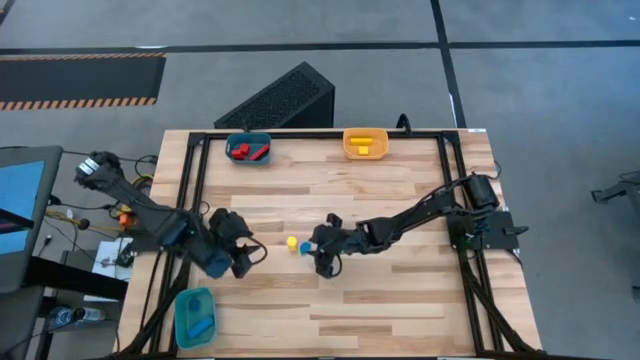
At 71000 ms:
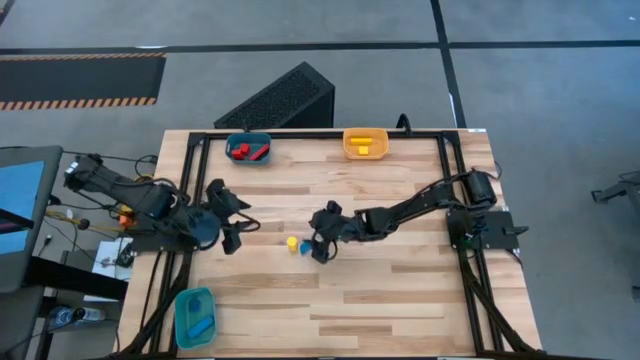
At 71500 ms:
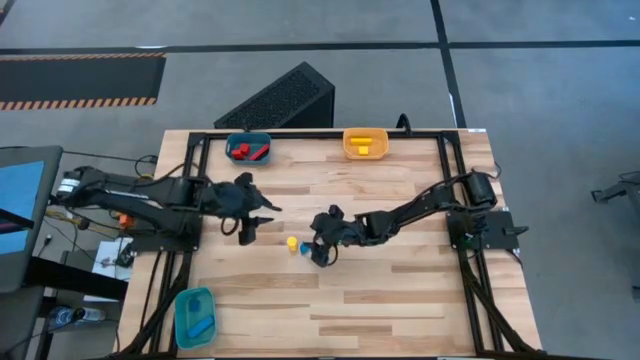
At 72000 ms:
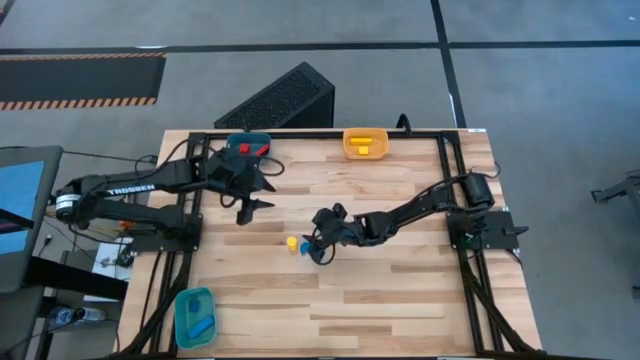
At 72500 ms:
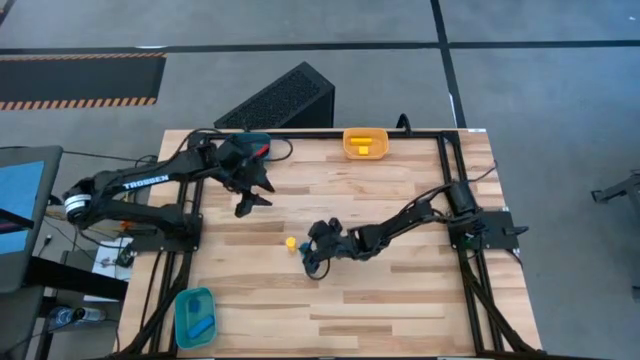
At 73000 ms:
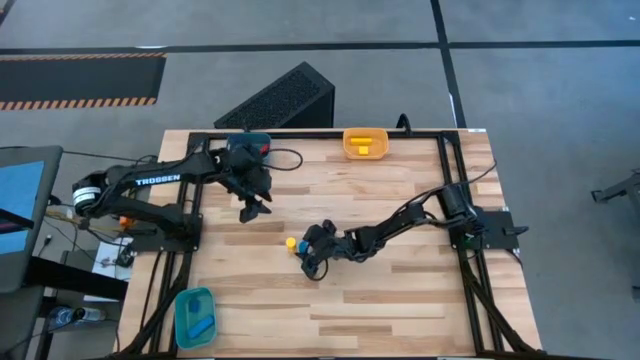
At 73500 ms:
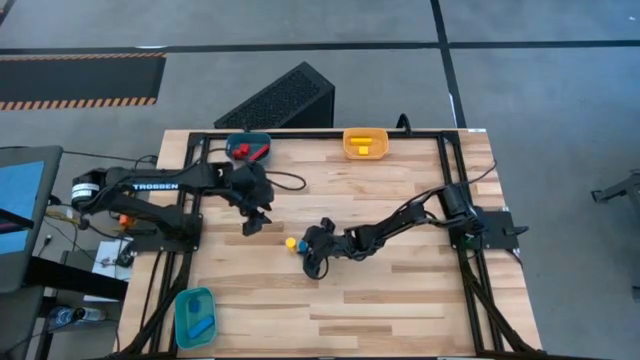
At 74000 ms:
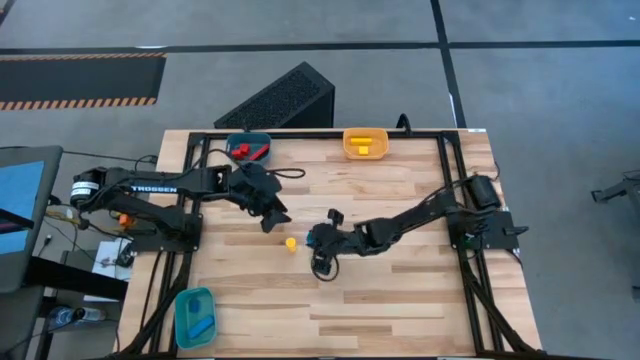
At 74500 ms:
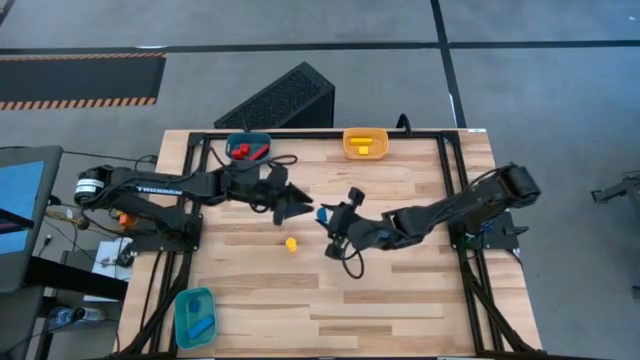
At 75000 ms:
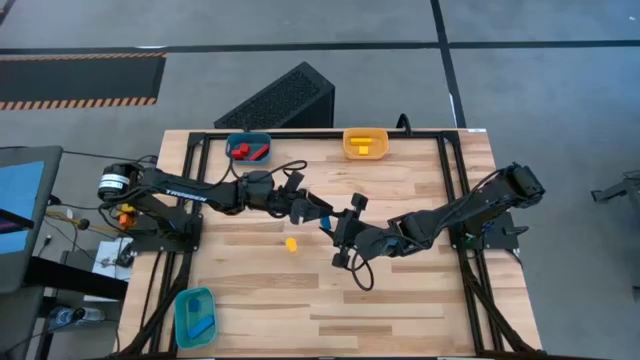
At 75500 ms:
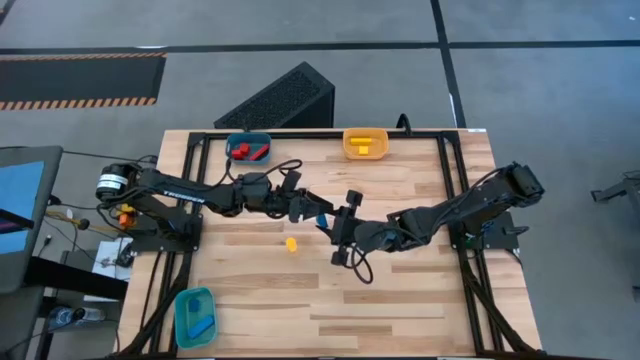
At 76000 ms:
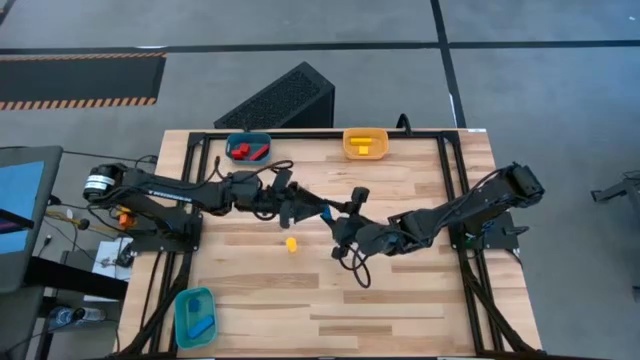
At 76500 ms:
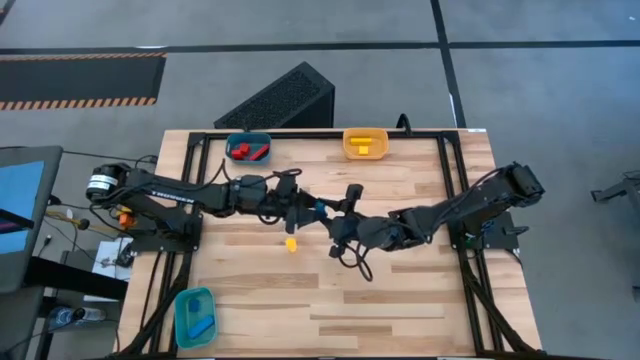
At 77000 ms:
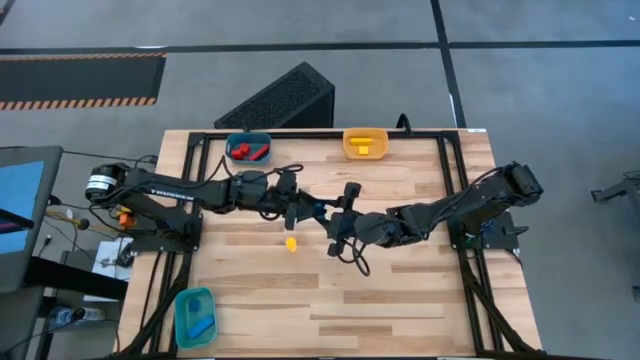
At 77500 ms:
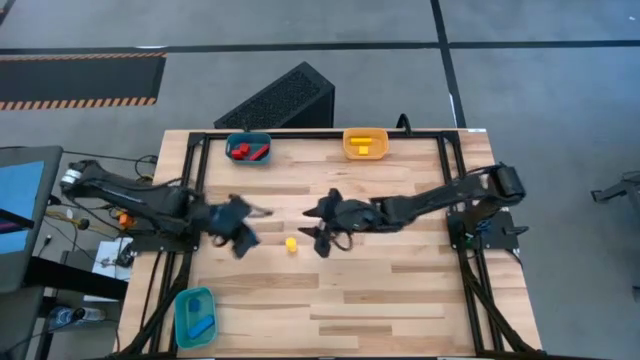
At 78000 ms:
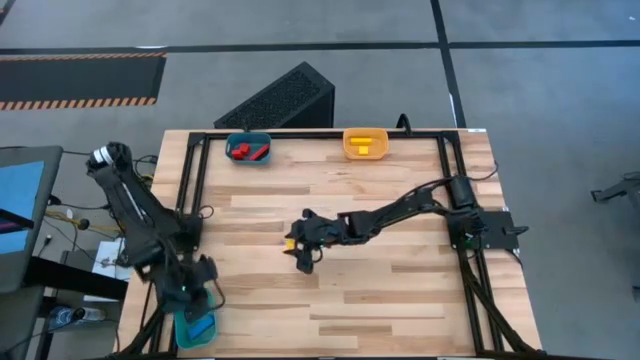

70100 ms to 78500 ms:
Task: Sort & place blocks by color
Put the blue block into the green bin

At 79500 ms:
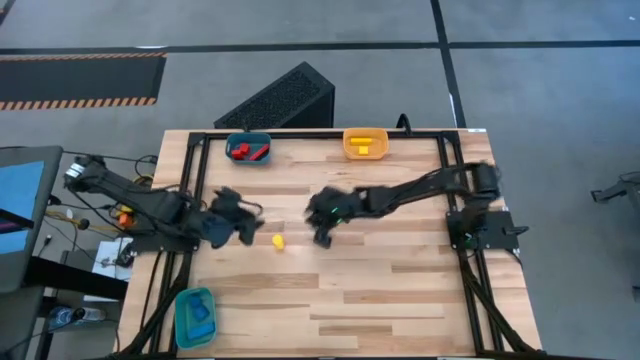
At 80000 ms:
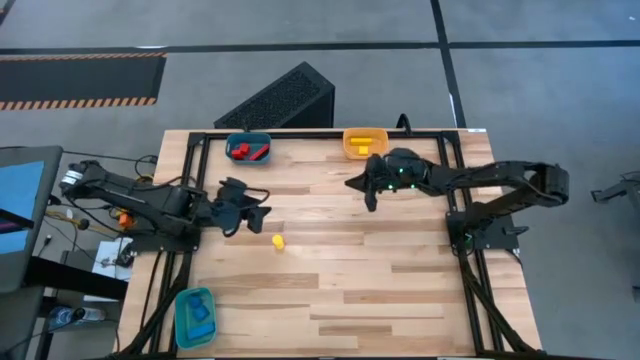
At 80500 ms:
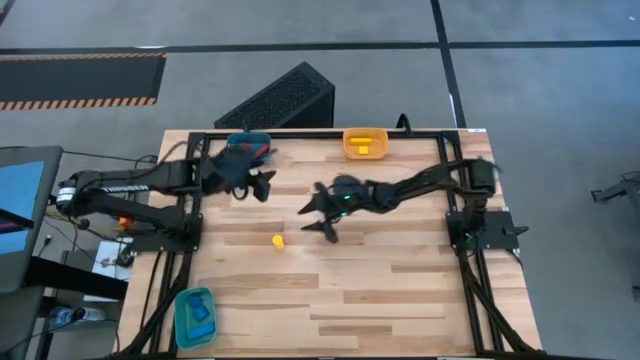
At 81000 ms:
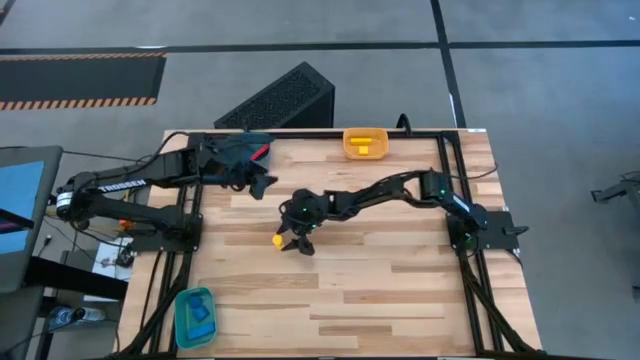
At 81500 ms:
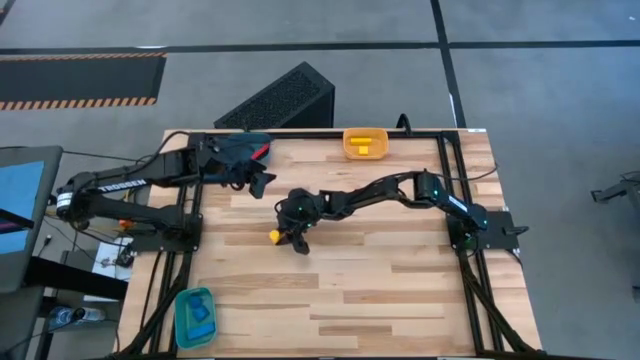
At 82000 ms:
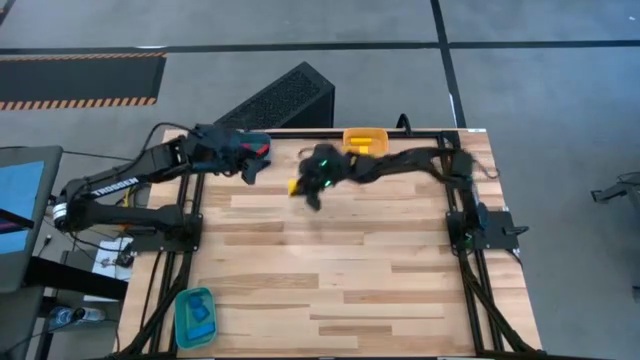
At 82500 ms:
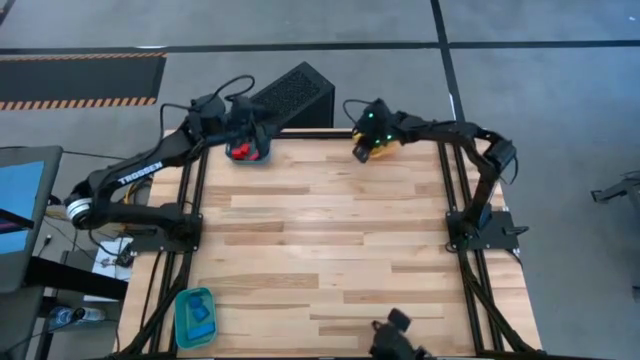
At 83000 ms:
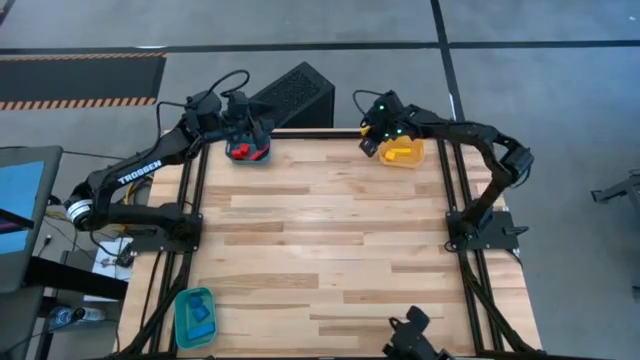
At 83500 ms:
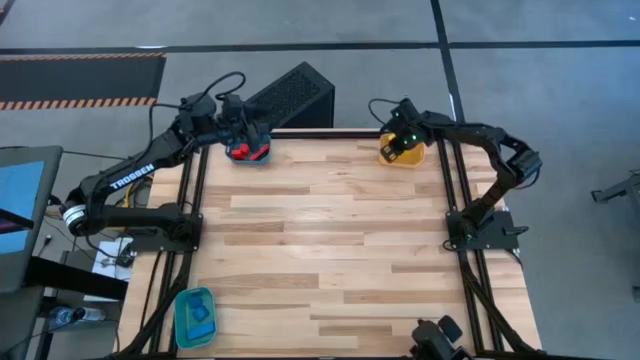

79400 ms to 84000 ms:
Put the yellow block into the yellow bin

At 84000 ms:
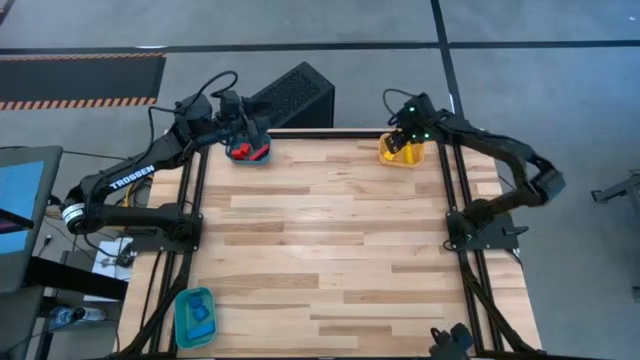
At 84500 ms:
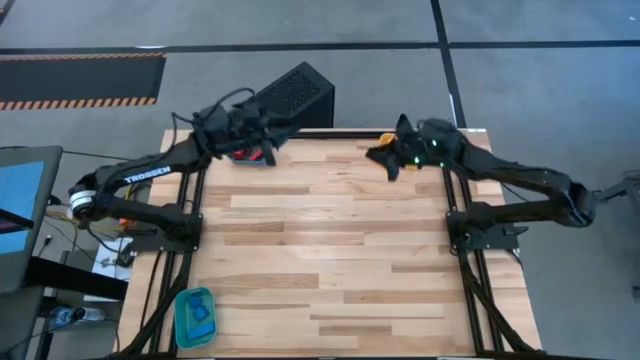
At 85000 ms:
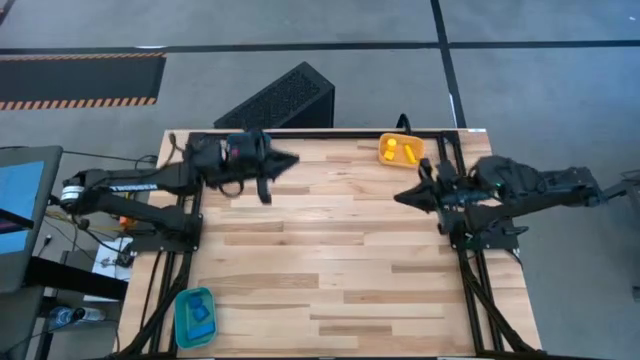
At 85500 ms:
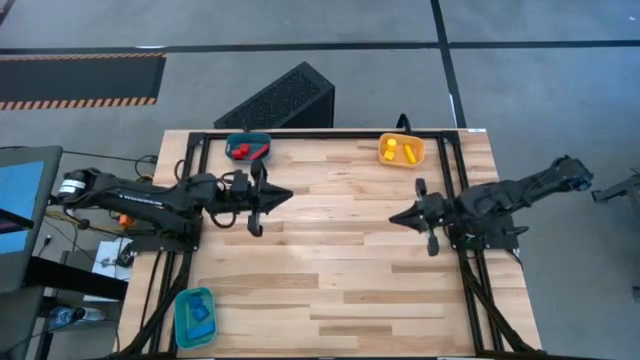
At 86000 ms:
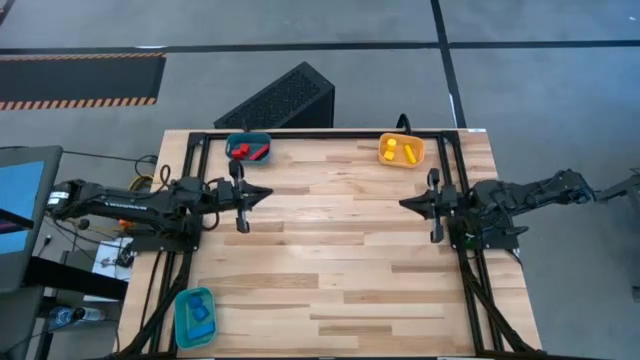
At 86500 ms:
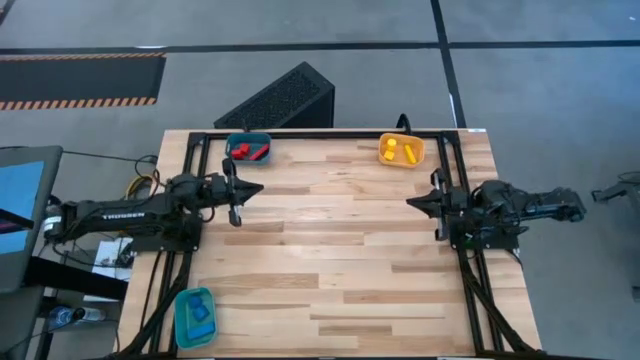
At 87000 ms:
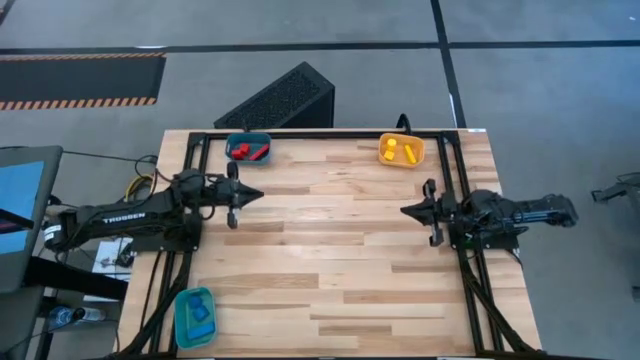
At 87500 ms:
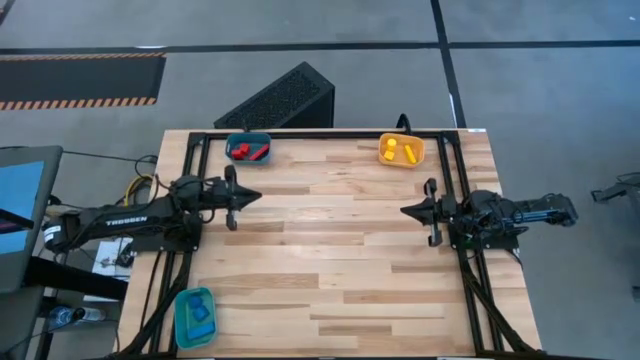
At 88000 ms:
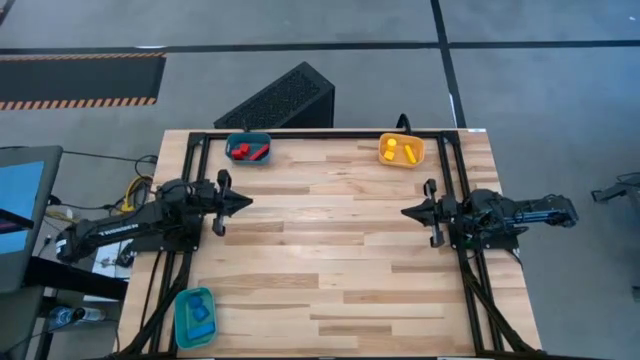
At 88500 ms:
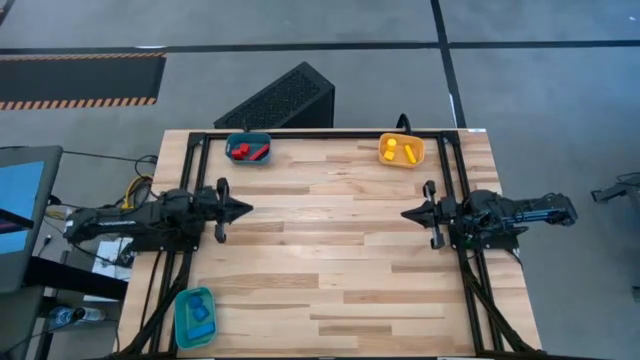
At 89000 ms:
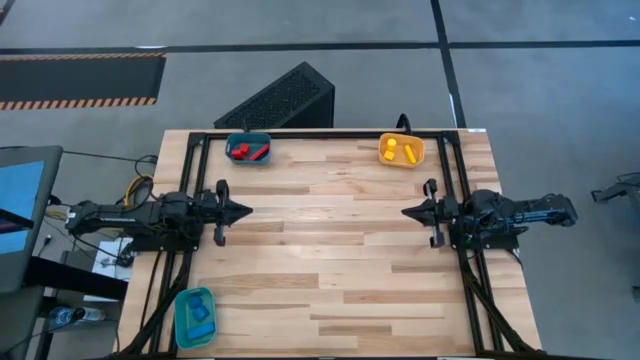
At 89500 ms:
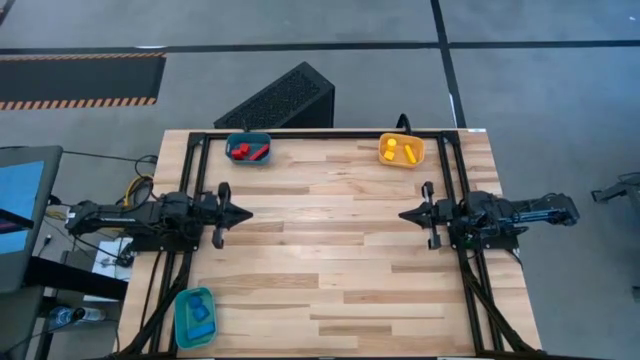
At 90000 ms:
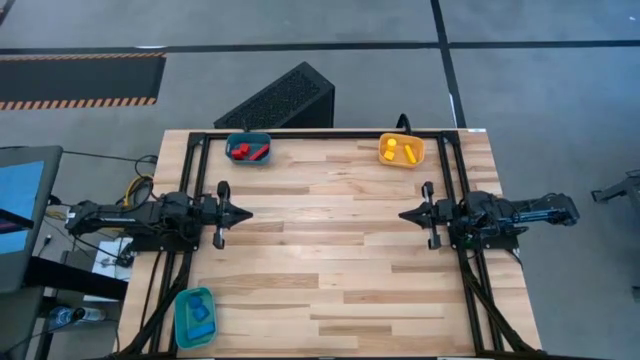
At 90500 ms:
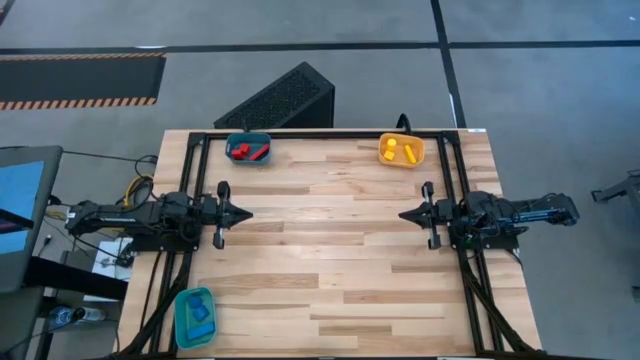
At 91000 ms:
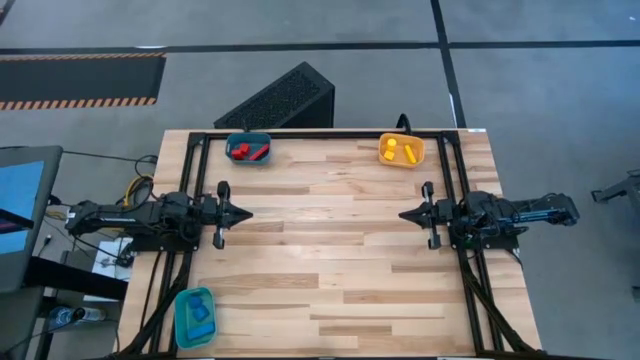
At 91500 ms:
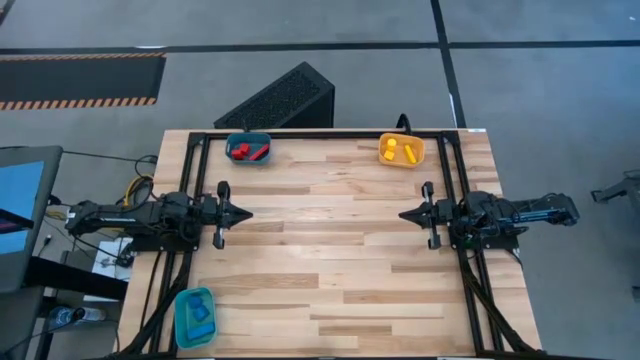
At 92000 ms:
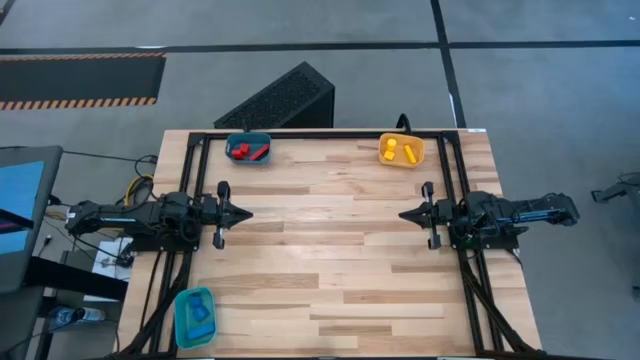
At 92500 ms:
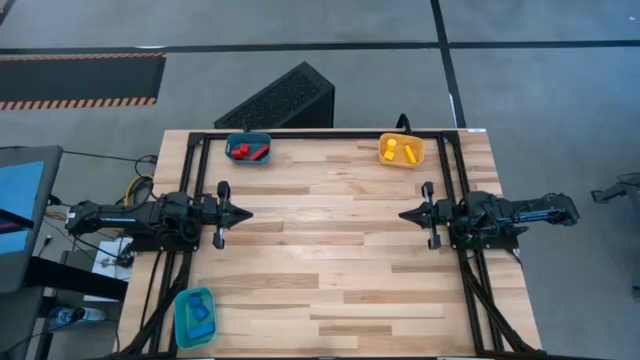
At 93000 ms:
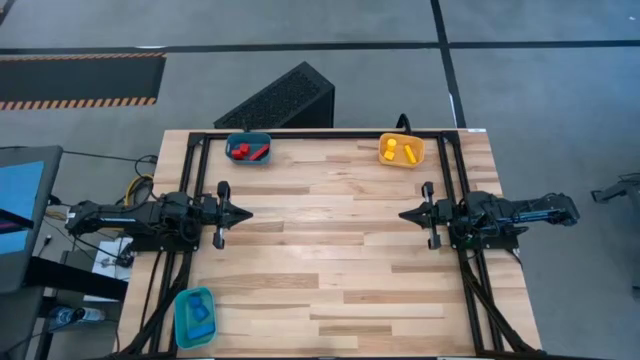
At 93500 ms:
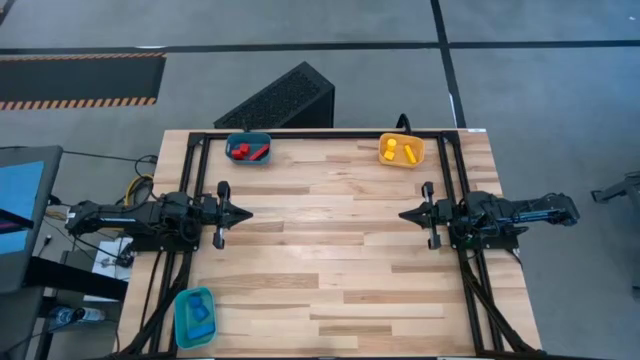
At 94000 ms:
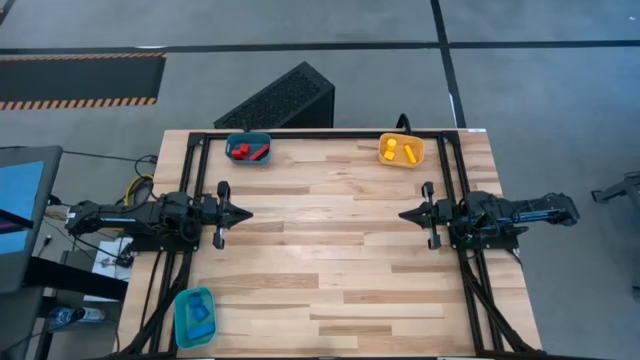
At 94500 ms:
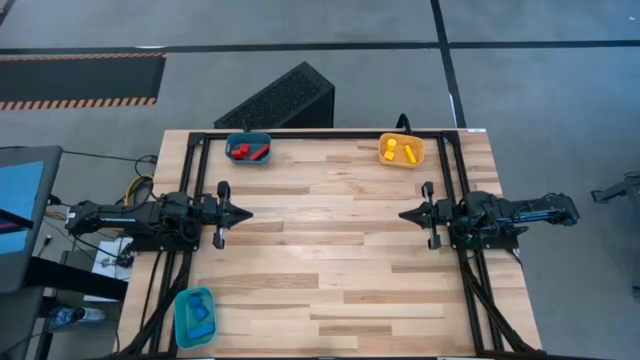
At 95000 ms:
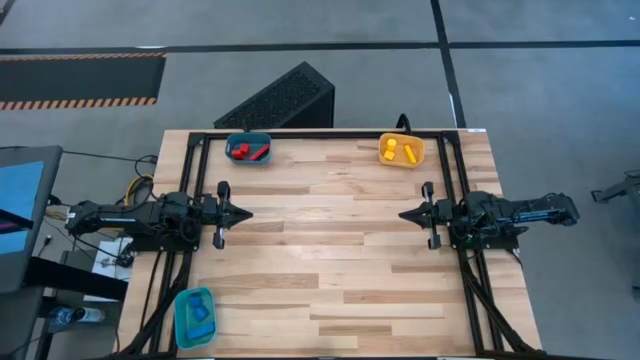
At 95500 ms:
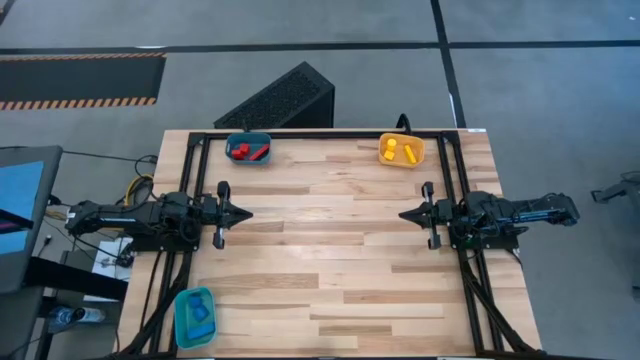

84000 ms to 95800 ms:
Return To Home Position
